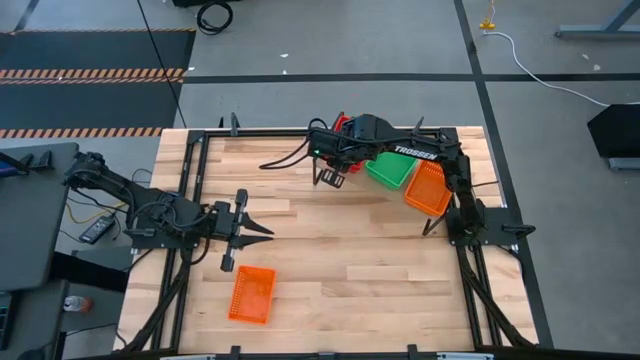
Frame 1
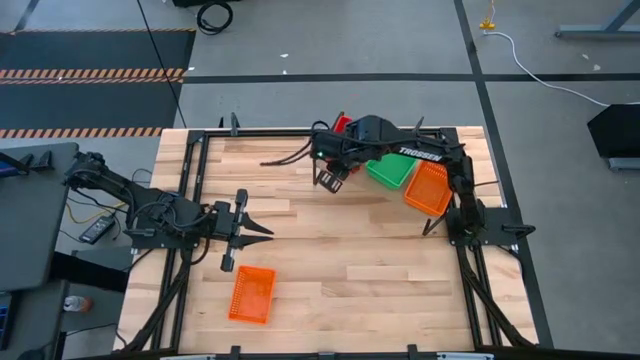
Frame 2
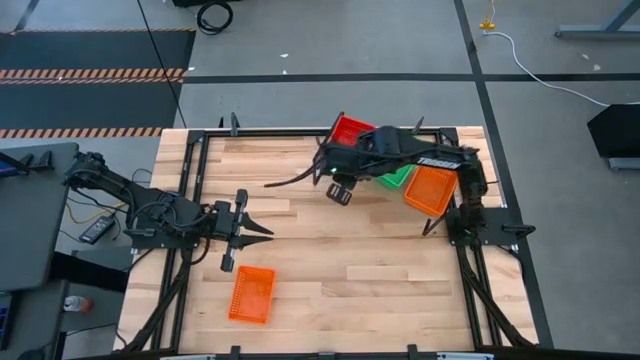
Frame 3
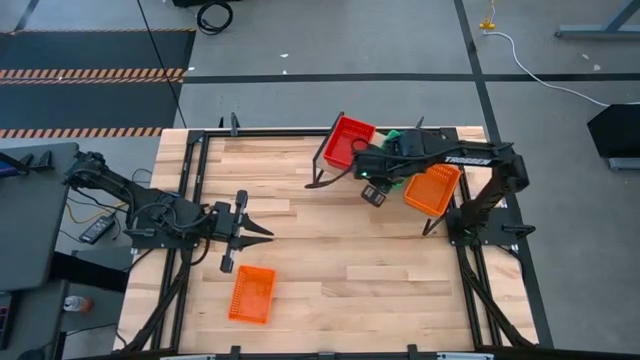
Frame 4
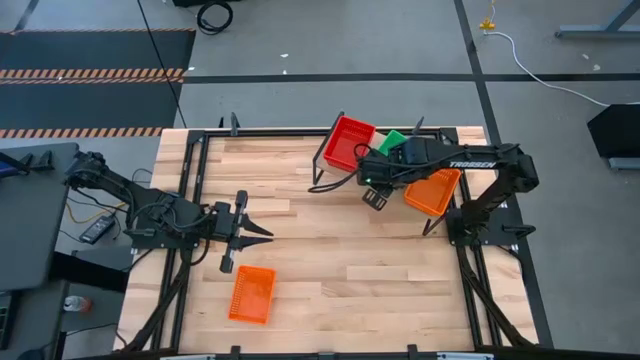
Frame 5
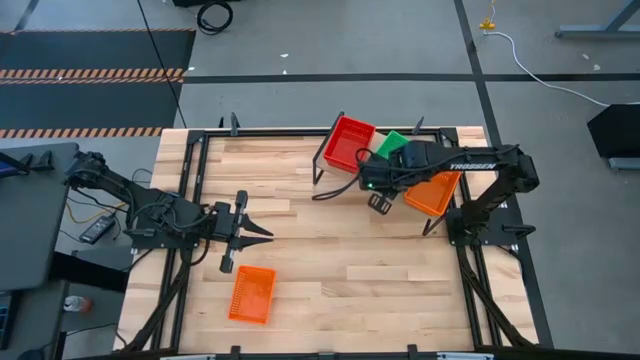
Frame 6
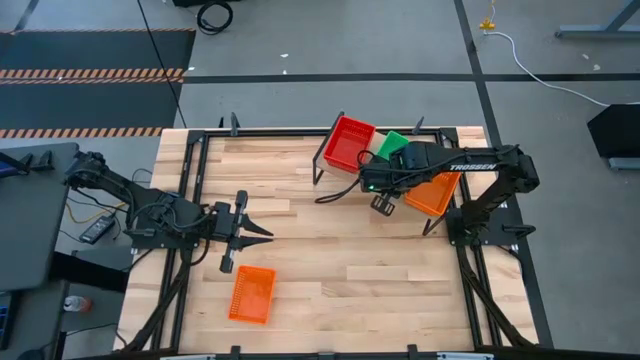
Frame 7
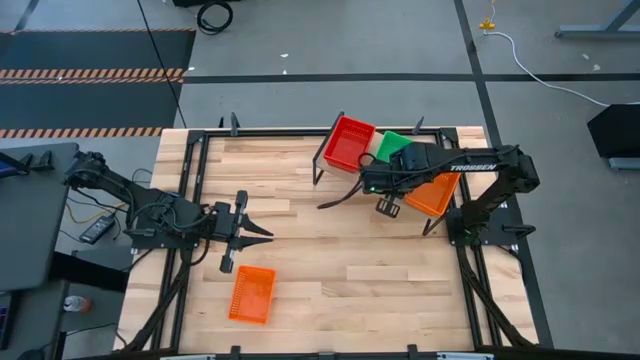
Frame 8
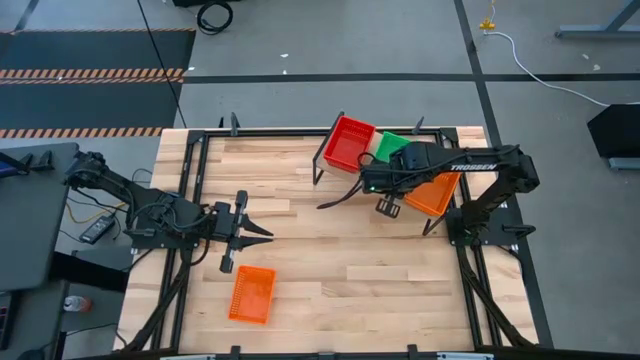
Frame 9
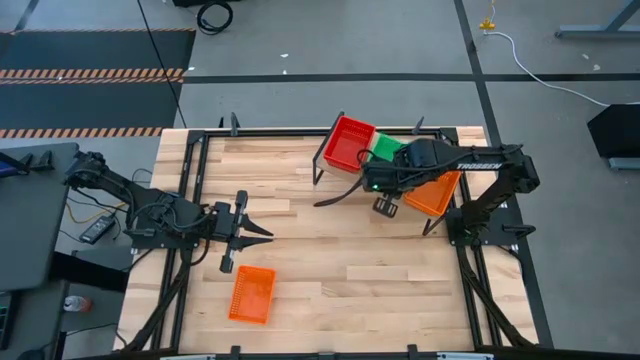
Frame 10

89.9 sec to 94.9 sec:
Task: Stack baskets on shelf by color
Adjust the stacked green bins on the shelf

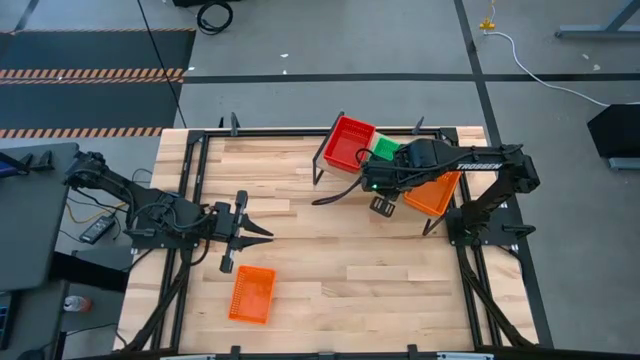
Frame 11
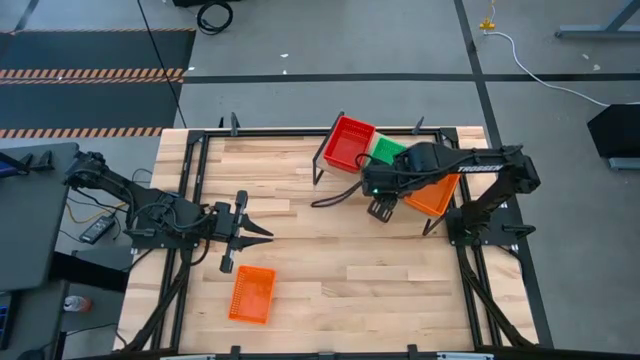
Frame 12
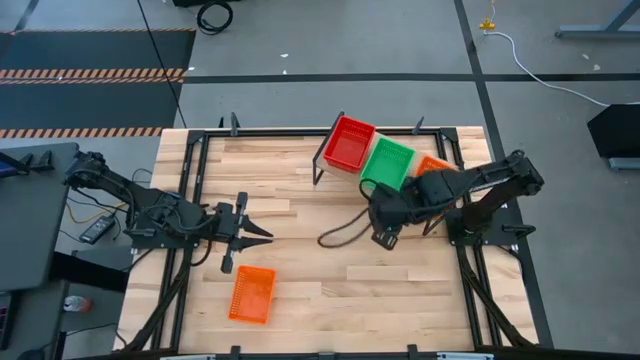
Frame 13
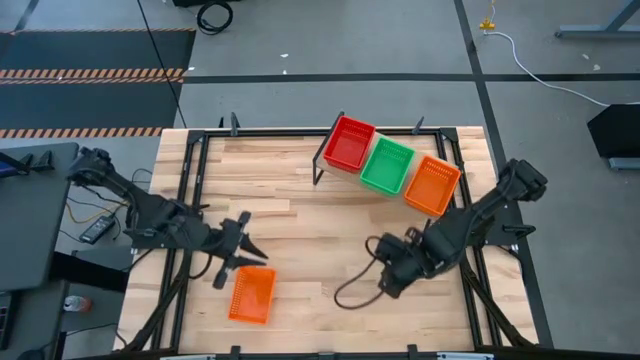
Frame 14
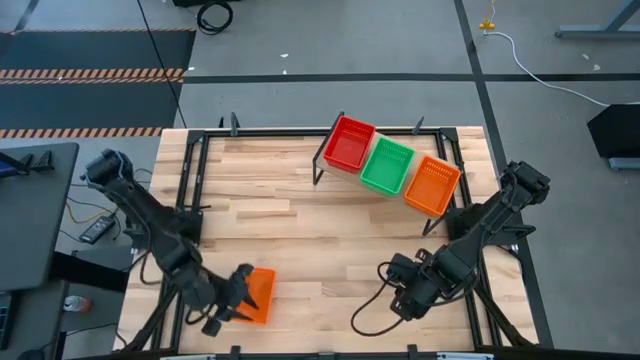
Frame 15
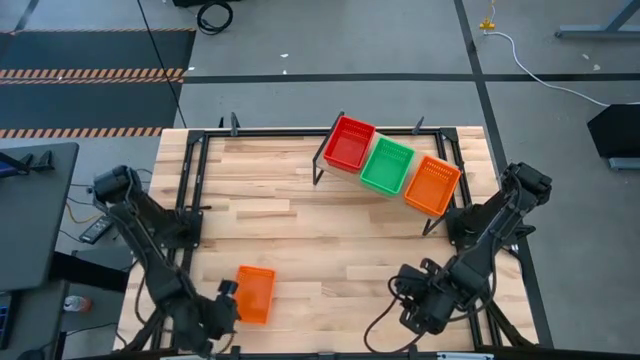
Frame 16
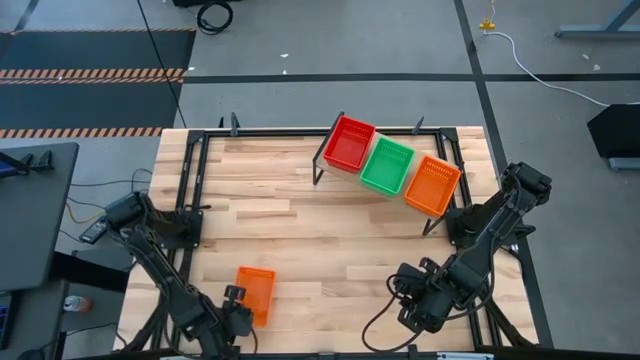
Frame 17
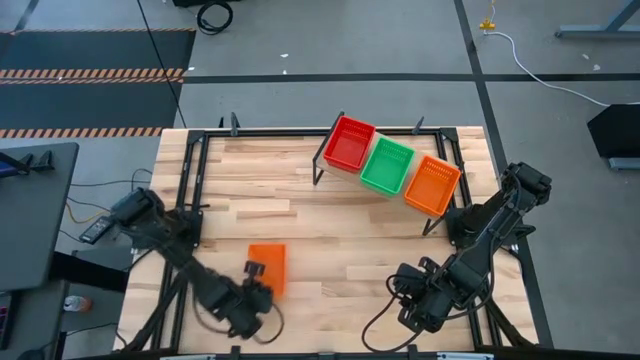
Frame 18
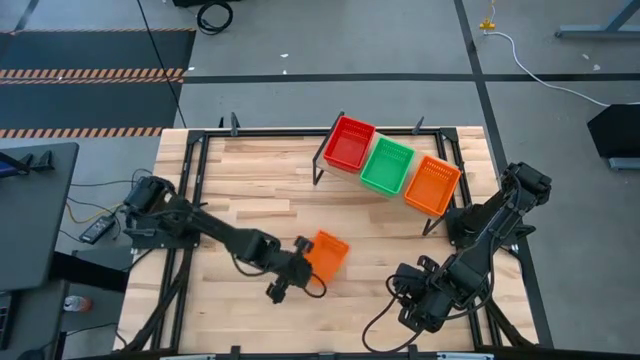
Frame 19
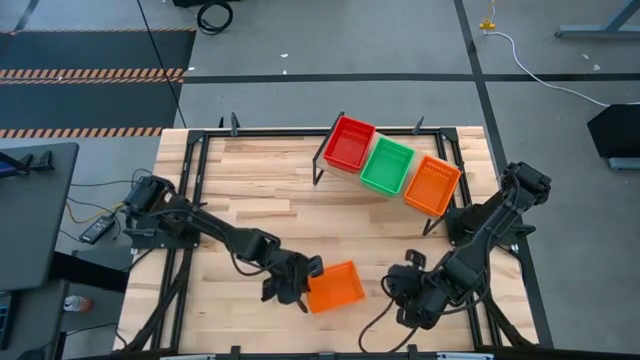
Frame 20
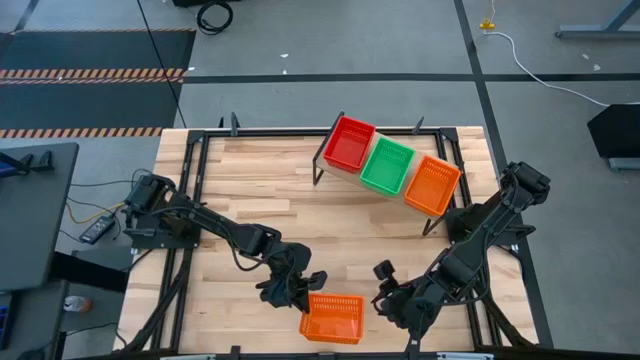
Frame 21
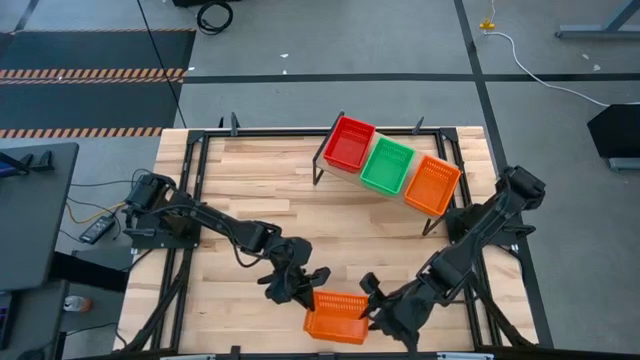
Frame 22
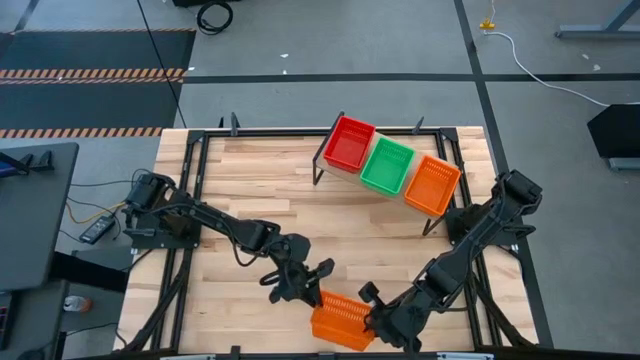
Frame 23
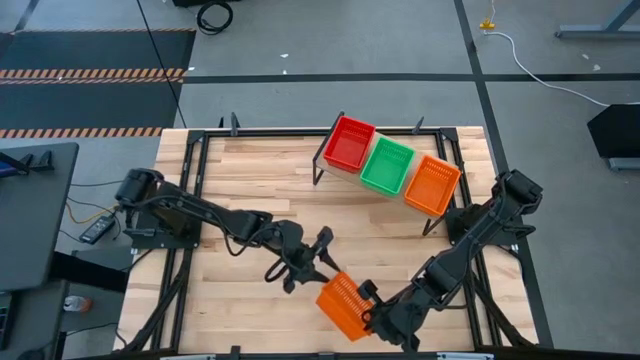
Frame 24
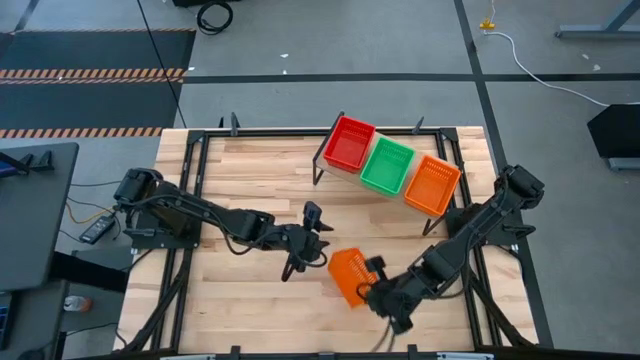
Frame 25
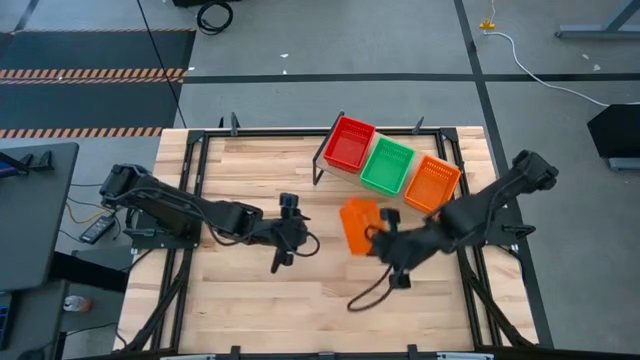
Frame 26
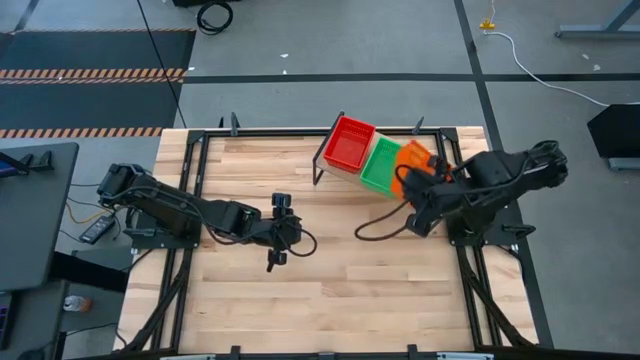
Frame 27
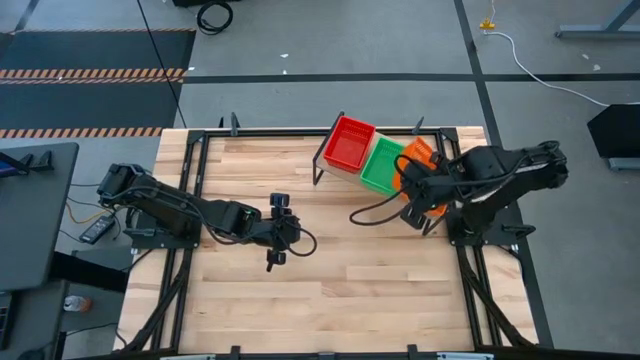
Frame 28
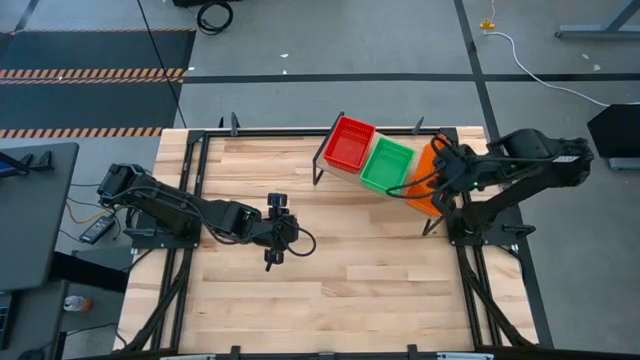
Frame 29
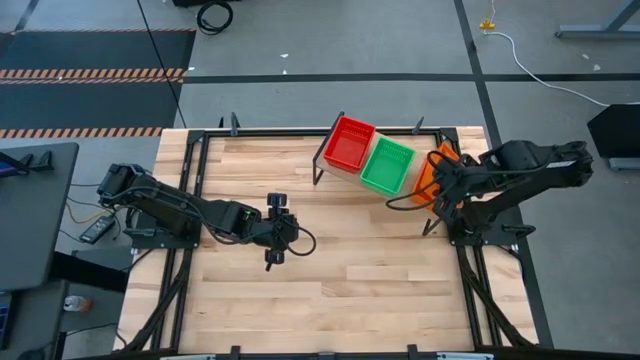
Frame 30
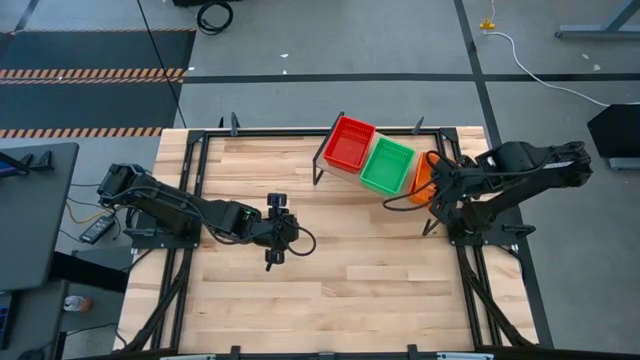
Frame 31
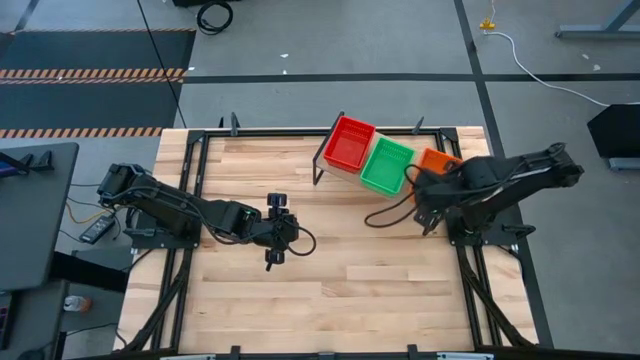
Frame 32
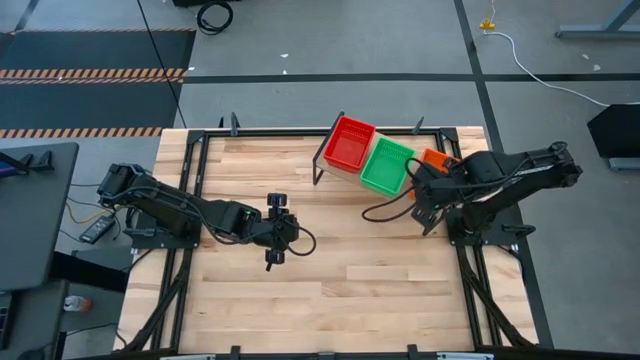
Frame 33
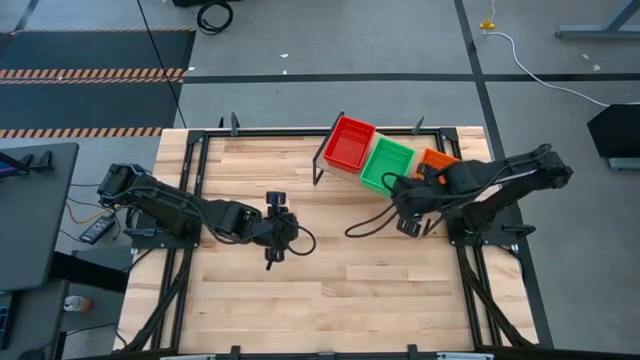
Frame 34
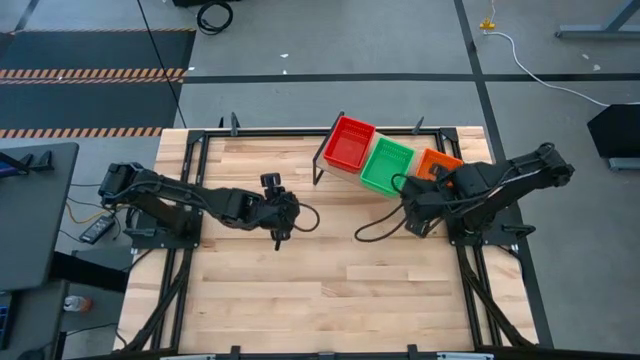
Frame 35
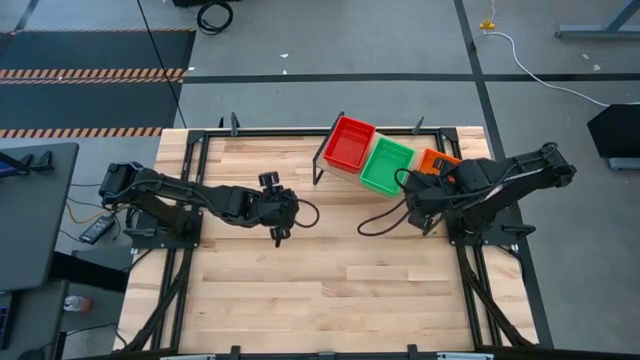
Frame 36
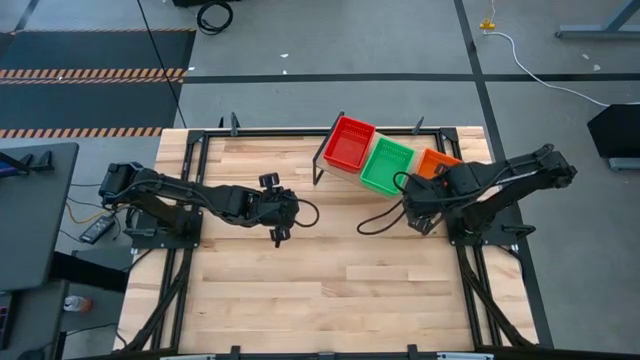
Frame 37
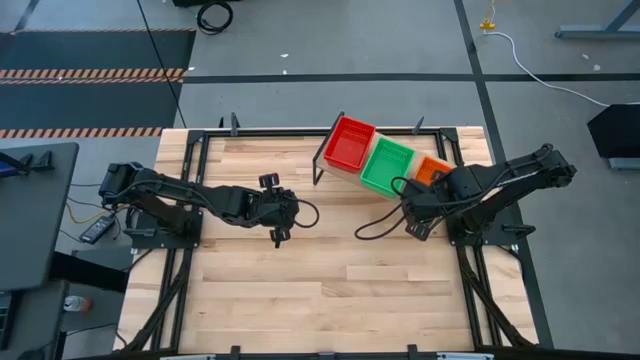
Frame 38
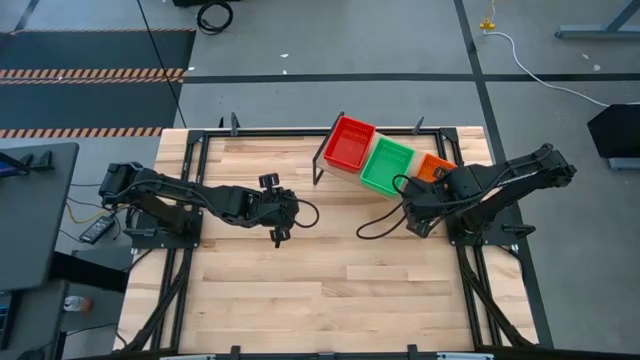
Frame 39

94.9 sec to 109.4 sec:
Stack the orange bin on the stacked orange bins on the shelf

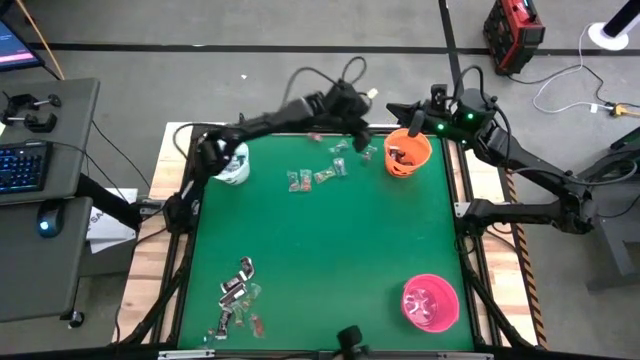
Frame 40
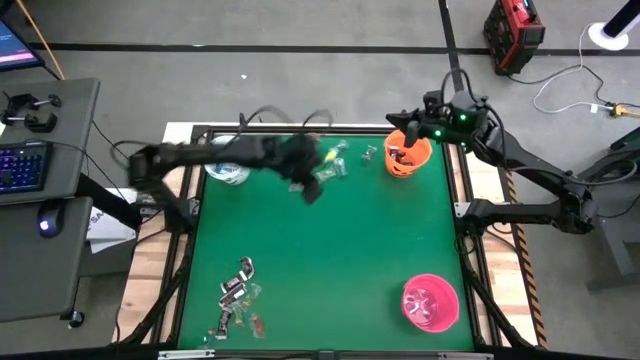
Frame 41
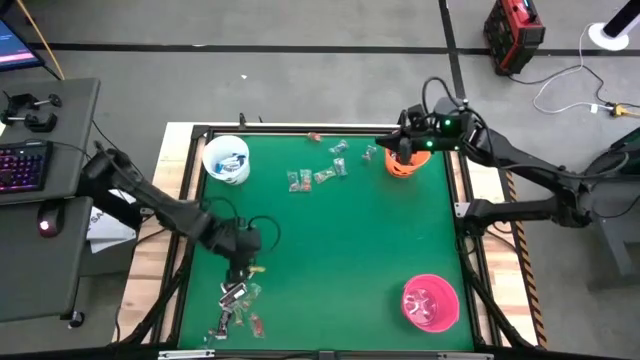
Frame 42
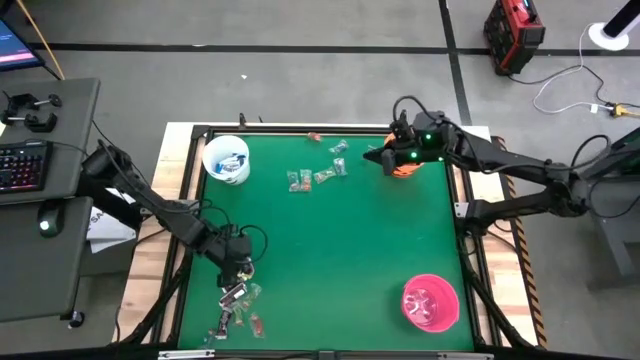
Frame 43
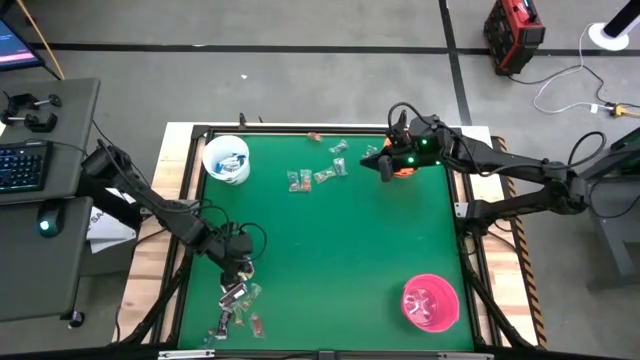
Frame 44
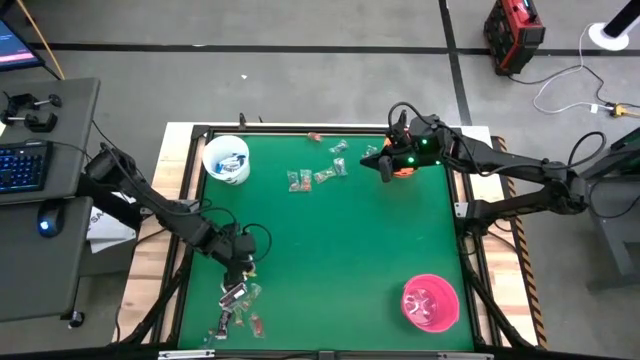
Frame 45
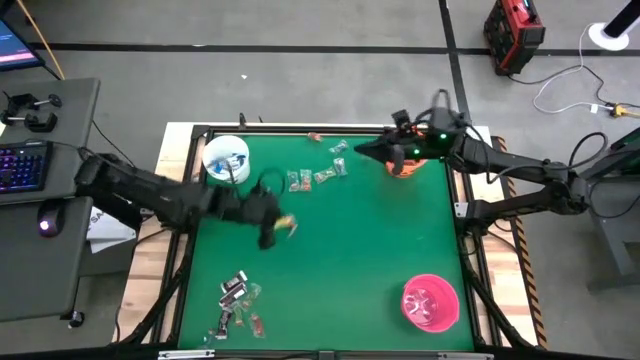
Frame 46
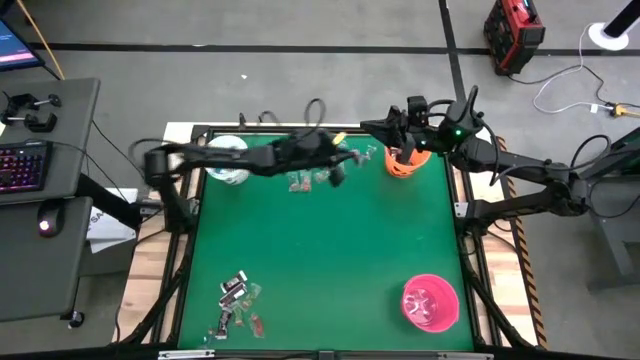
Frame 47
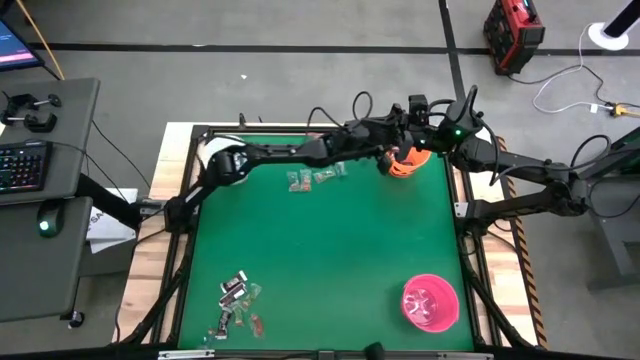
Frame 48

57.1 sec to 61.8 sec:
Task: Sort candy by brand, put in halloween buckets
Put the brown chocolate bar into the orange bucket
